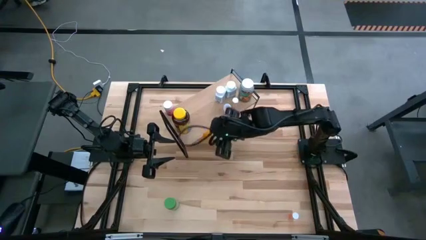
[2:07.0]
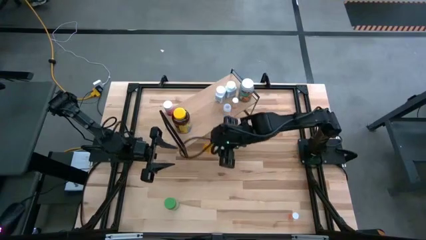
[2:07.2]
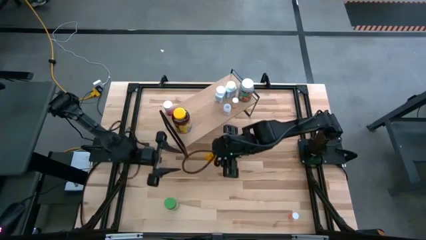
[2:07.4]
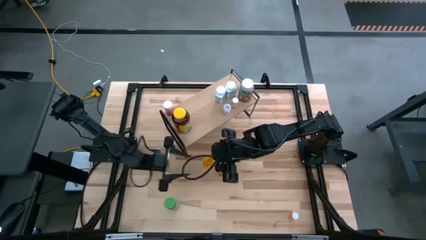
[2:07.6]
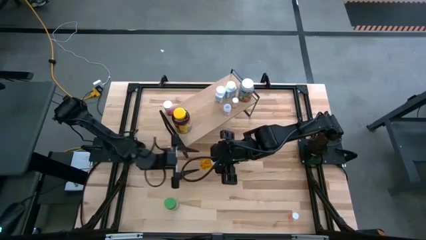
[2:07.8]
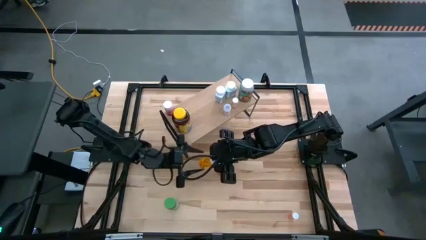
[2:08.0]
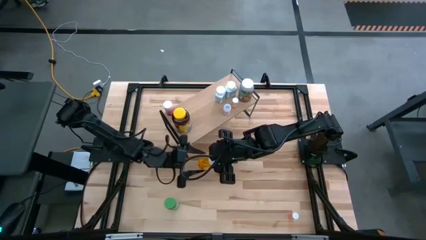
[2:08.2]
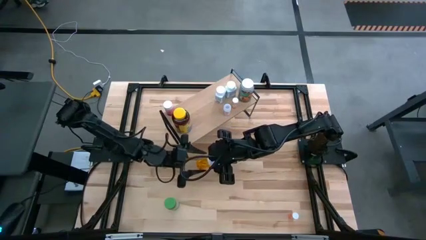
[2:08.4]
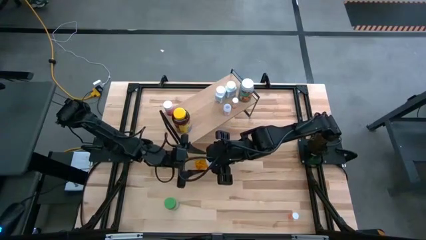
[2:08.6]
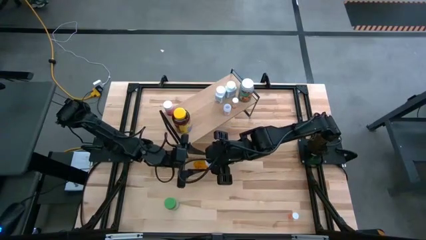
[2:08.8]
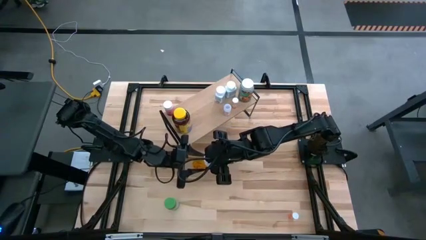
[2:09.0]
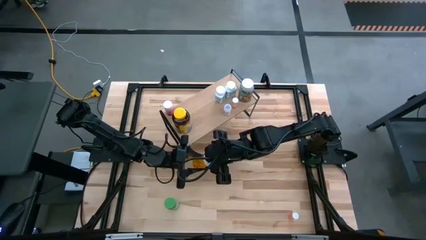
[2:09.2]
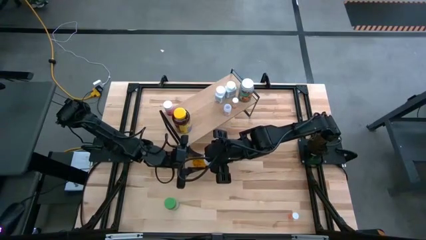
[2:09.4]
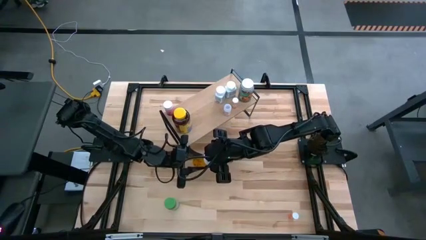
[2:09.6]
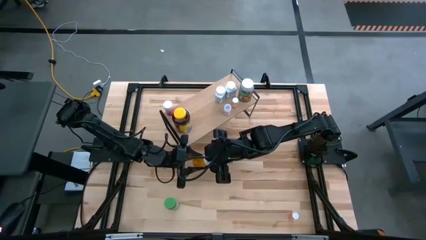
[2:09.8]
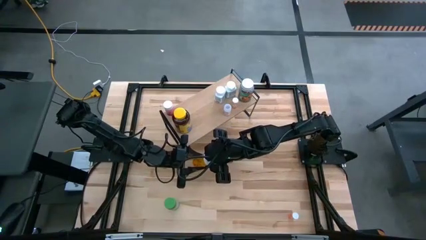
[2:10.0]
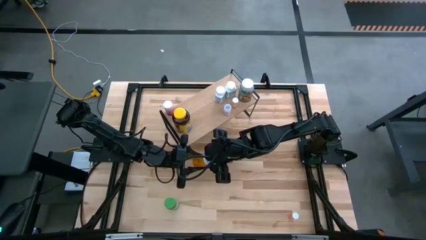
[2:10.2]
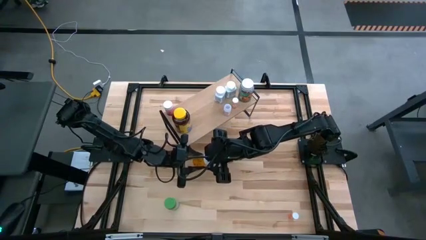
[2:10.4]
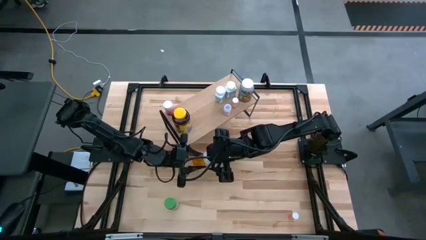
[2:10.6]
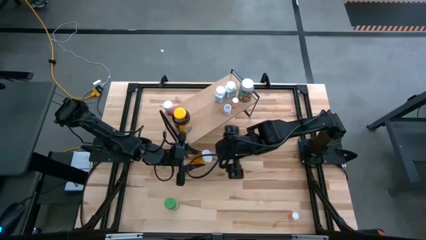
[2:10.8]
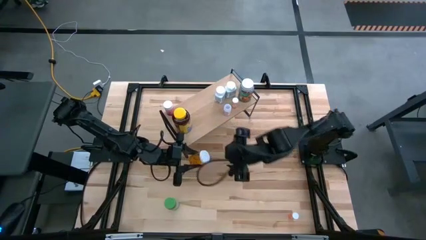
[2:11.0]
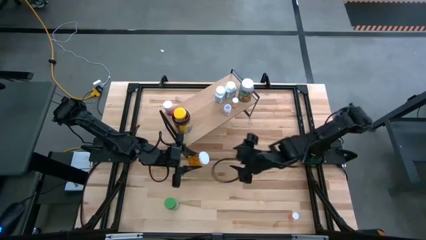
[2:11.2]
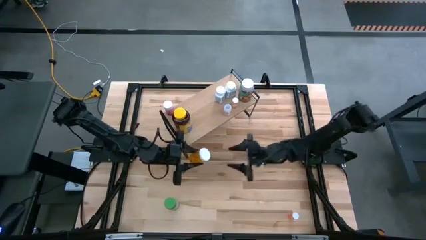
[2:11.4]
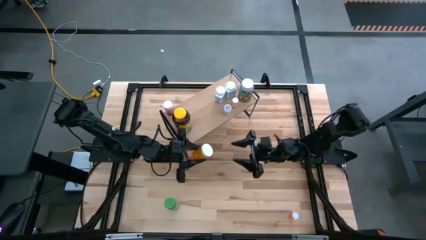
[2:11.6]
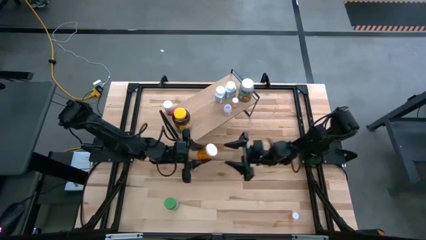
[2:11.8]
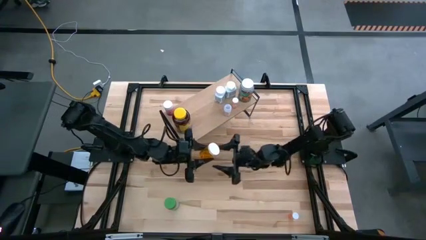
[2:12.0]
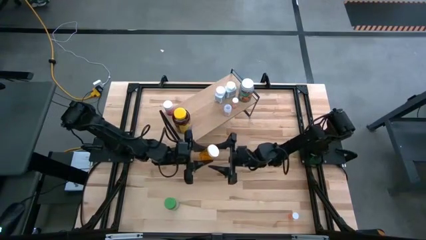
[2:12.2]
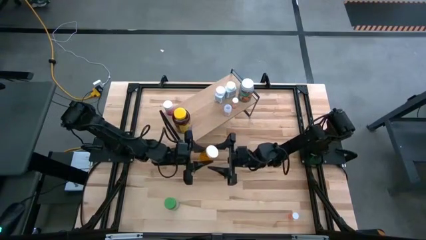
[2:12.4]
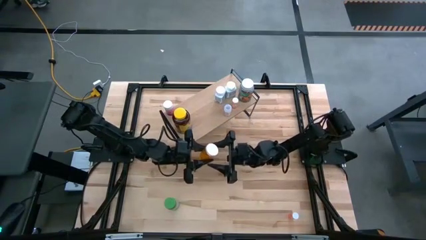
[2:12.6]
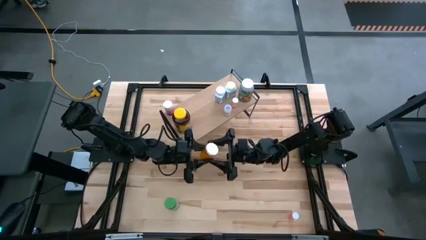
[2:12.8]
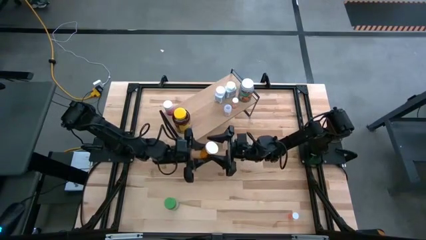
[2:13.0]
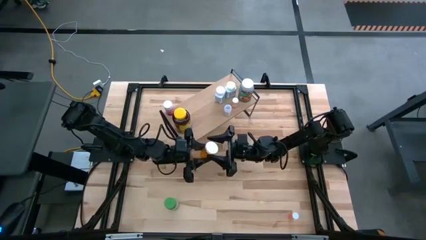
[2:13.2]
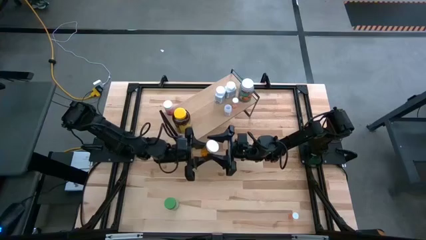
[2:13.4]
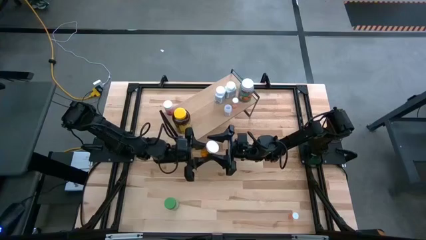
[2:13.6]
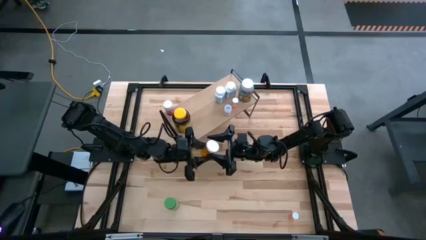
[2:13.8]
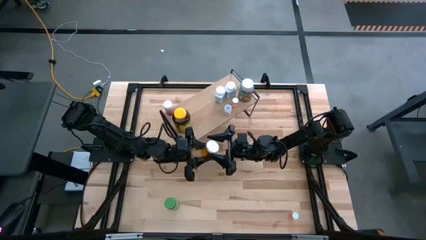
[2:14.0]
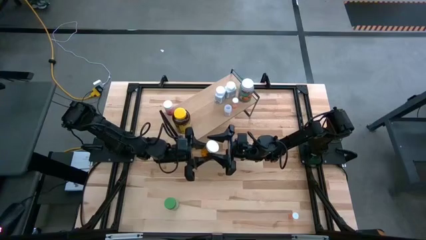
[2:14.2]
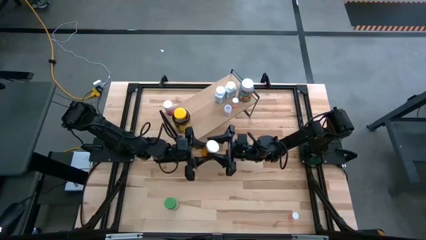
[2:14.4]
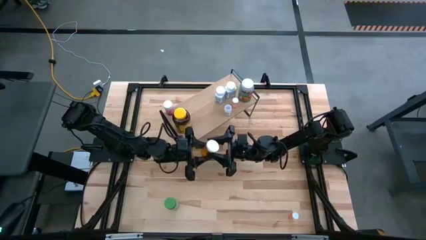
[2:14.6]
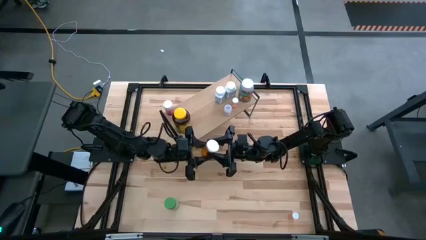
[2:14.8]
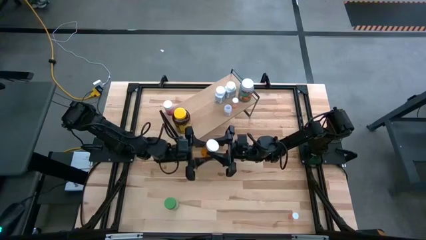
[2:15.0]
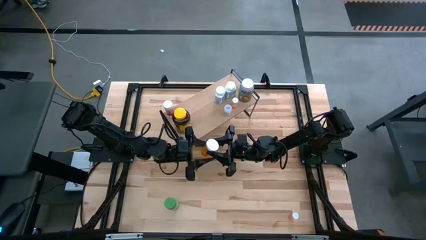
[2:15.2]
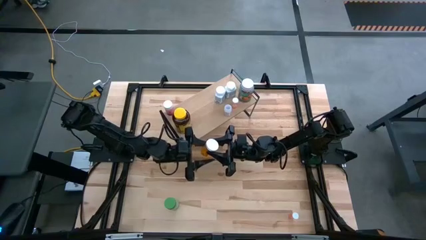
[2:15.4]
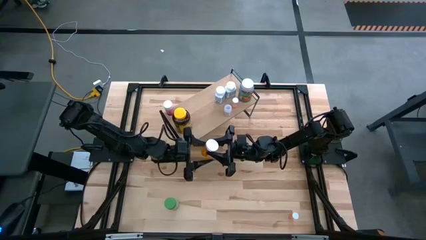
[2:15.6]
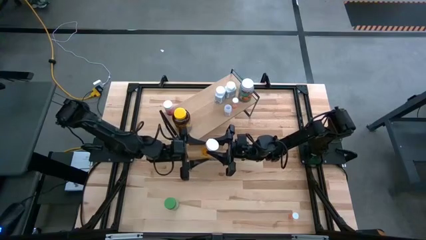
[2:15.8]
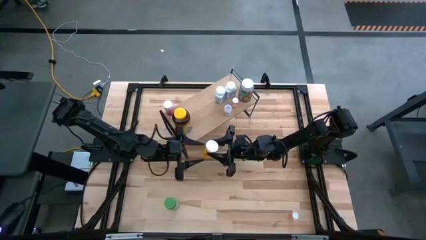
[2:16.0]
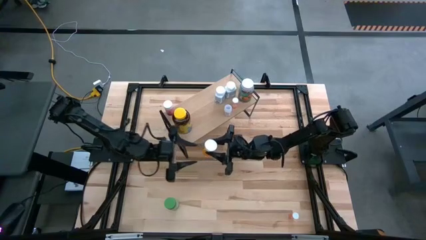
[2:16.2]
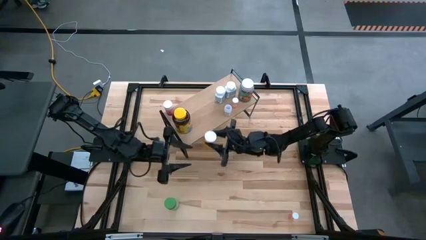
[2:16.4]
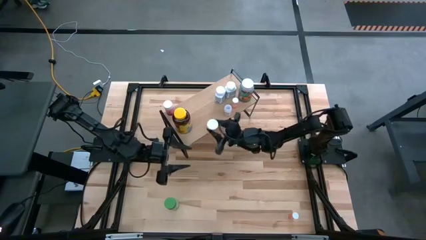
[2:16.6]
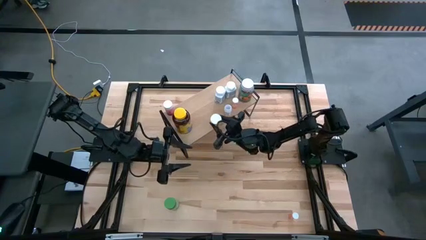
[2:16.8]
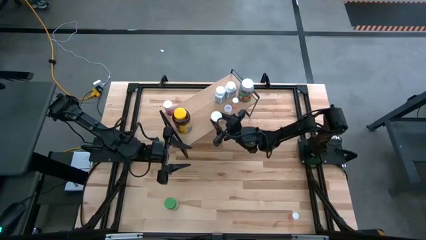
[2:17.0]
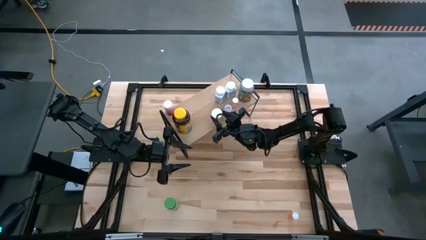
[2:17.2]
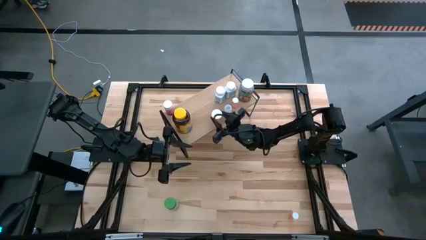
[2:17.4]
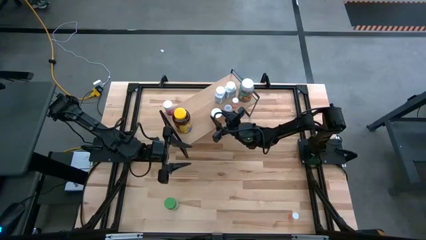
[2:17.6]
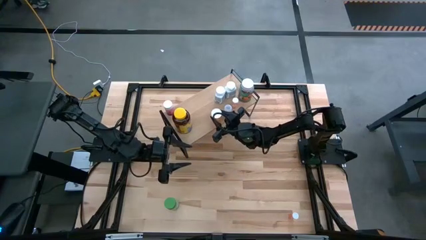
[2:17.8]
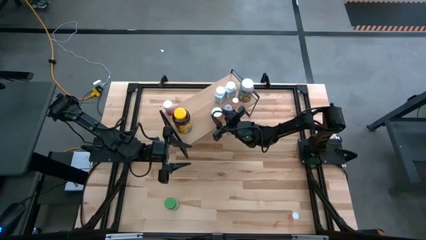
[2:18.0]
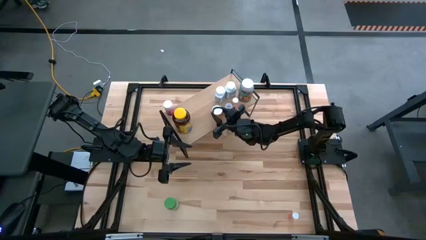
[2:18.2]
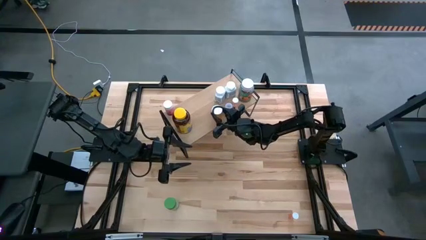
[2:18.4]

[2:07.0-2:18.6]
Task: Pick and place medicine bottles onto shelf by color
Put the orange medicine bottle on the shelf
